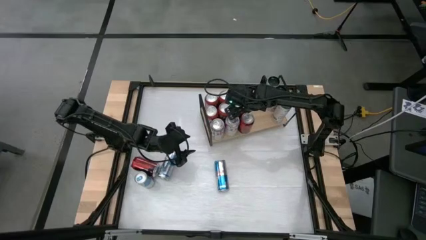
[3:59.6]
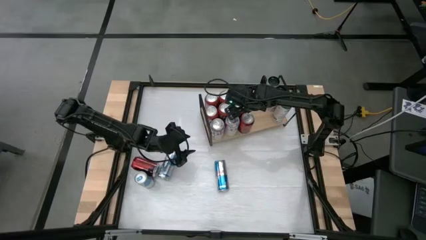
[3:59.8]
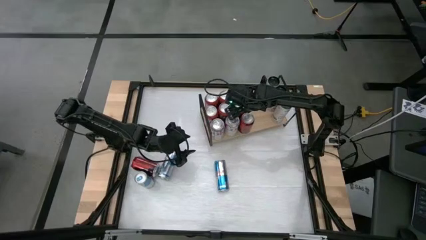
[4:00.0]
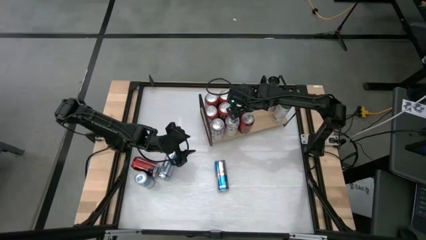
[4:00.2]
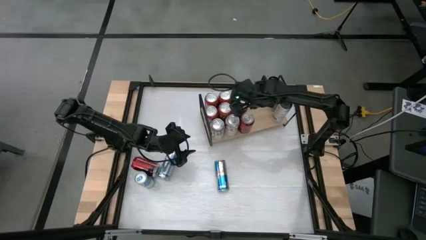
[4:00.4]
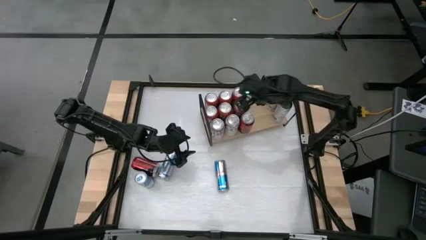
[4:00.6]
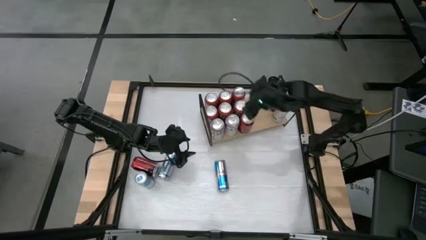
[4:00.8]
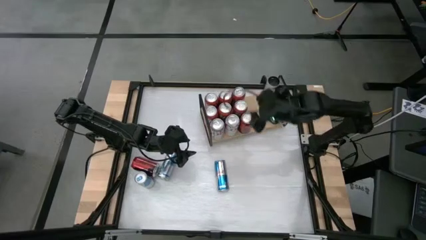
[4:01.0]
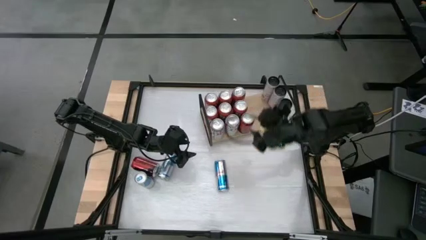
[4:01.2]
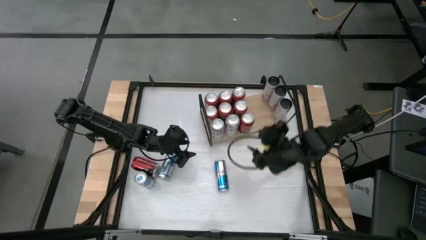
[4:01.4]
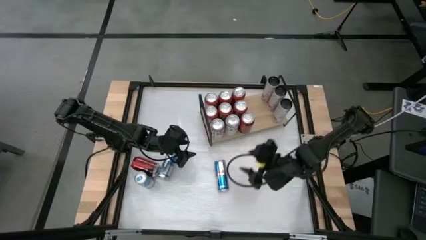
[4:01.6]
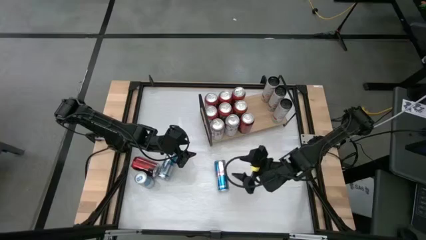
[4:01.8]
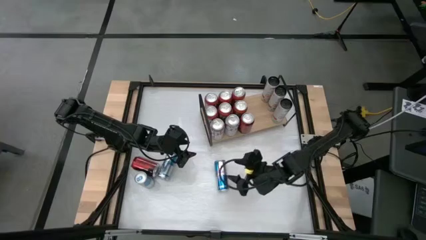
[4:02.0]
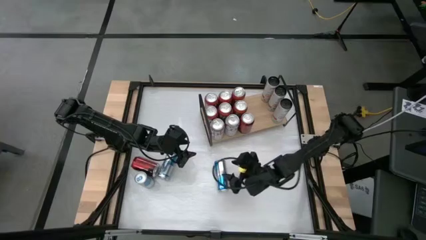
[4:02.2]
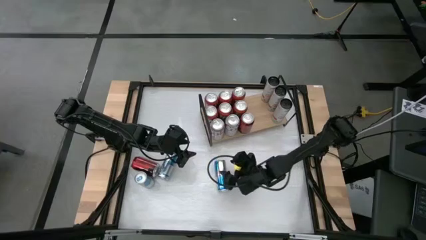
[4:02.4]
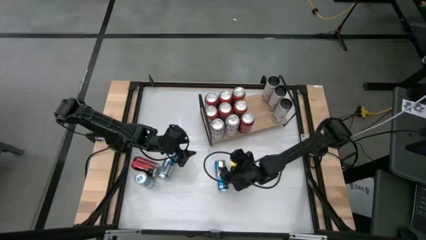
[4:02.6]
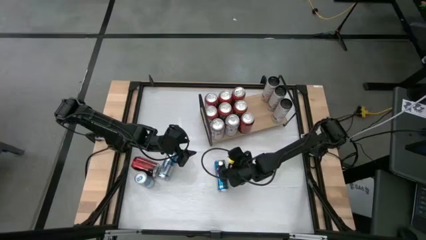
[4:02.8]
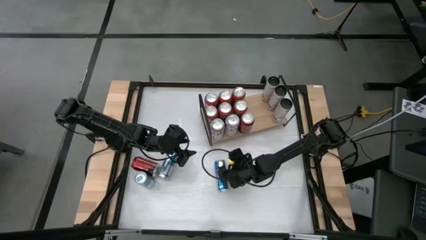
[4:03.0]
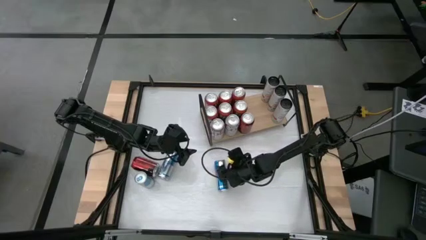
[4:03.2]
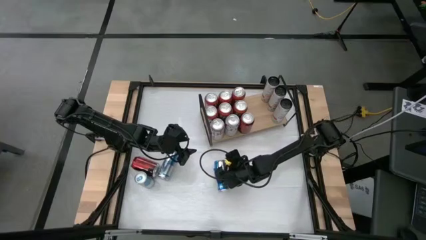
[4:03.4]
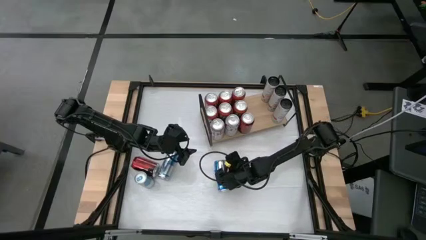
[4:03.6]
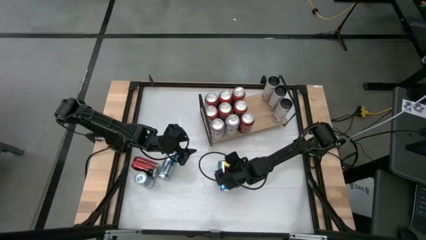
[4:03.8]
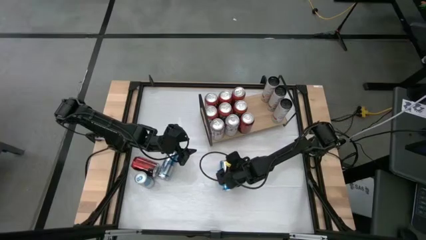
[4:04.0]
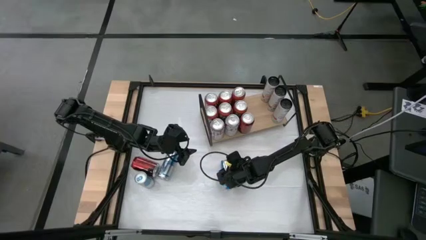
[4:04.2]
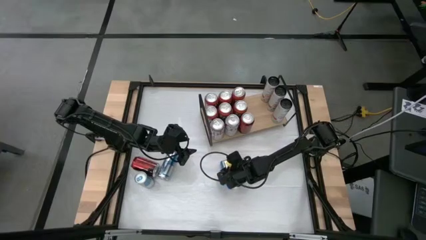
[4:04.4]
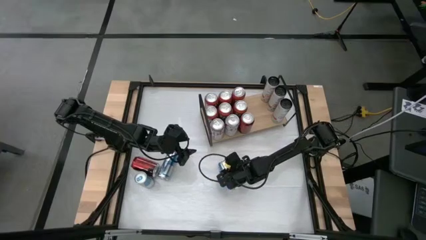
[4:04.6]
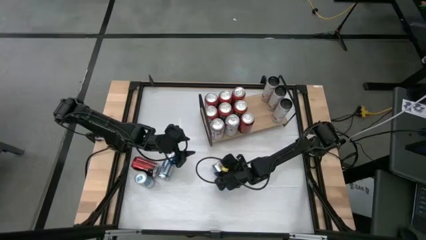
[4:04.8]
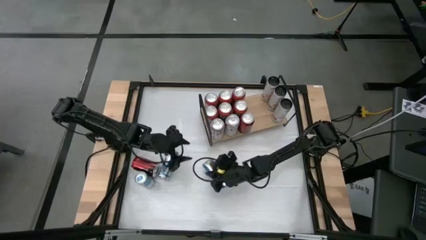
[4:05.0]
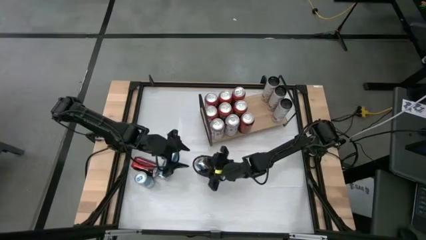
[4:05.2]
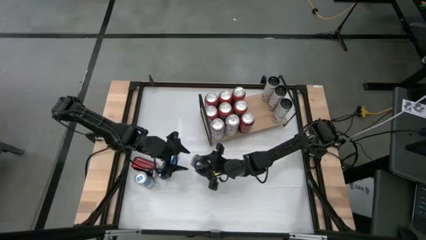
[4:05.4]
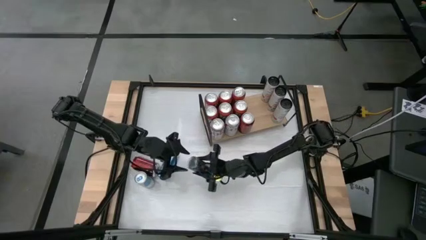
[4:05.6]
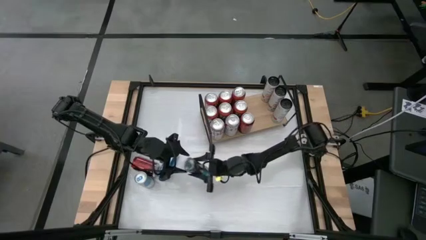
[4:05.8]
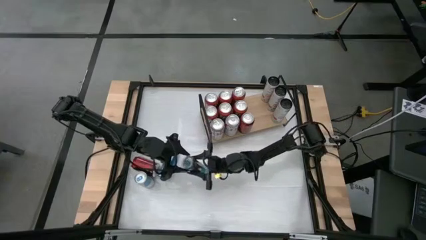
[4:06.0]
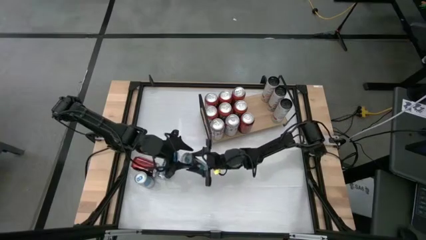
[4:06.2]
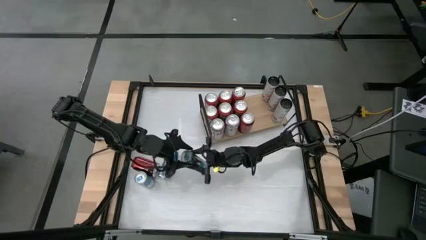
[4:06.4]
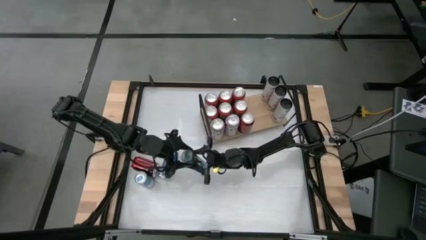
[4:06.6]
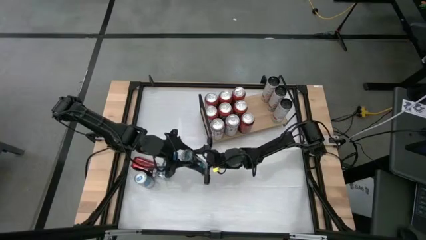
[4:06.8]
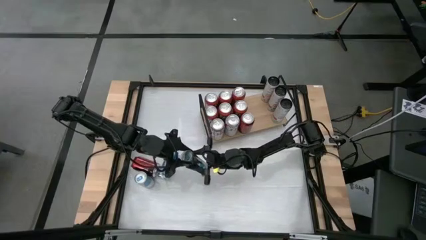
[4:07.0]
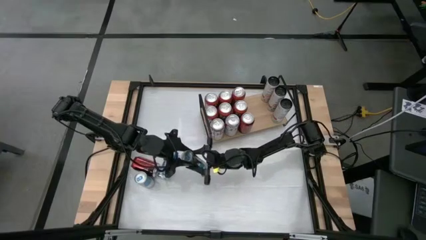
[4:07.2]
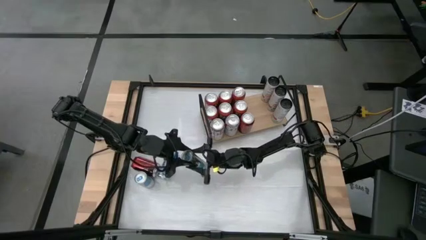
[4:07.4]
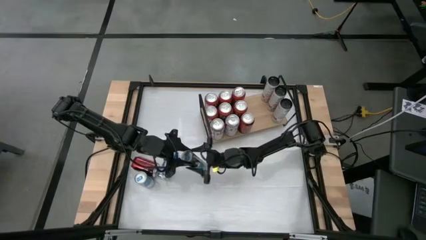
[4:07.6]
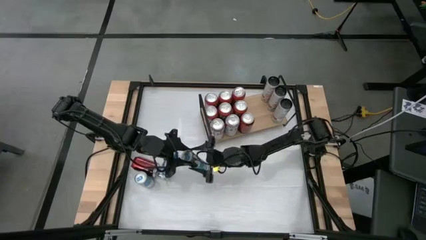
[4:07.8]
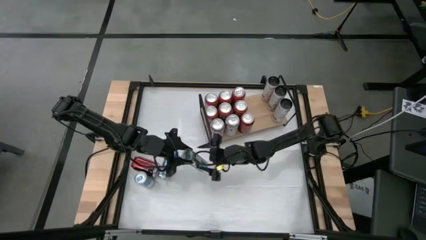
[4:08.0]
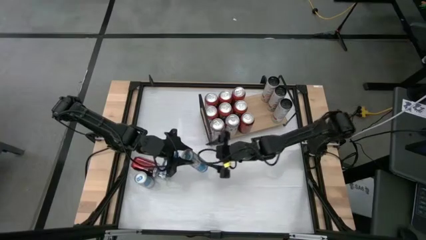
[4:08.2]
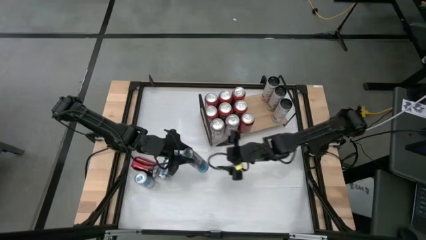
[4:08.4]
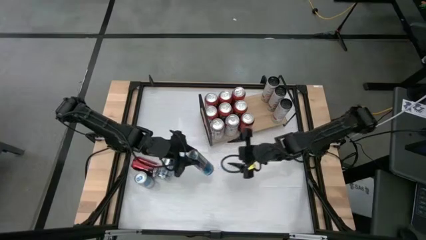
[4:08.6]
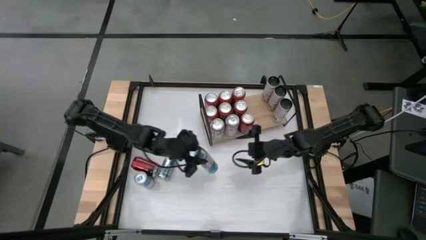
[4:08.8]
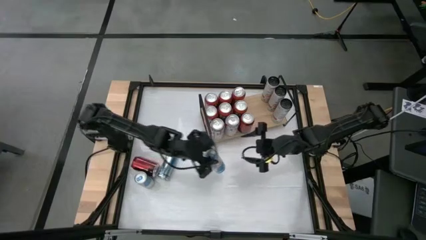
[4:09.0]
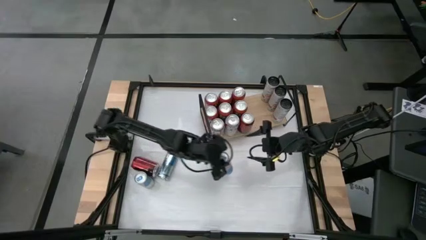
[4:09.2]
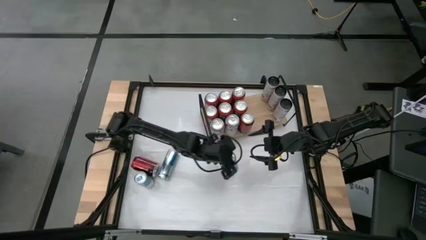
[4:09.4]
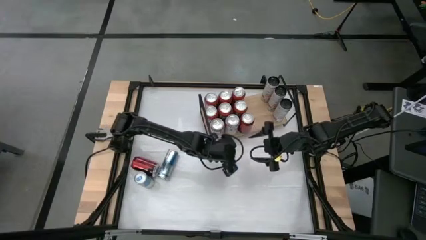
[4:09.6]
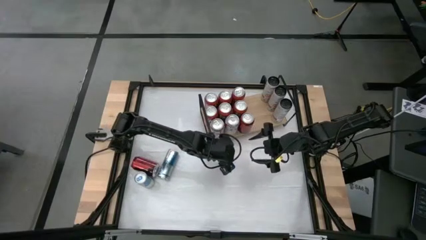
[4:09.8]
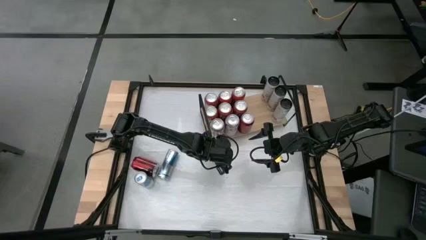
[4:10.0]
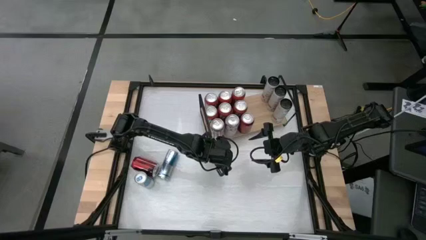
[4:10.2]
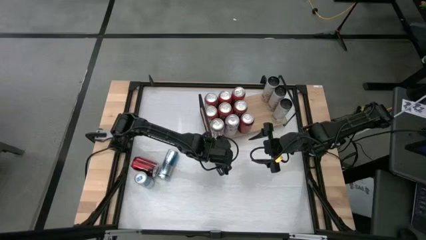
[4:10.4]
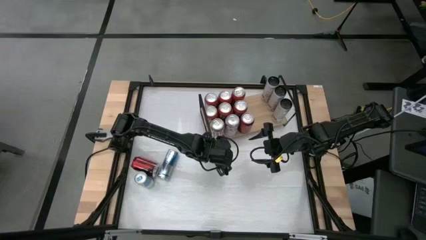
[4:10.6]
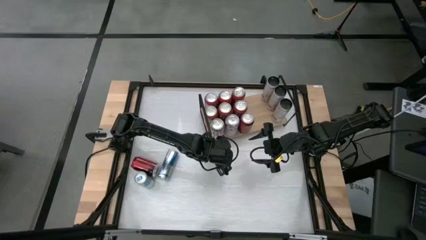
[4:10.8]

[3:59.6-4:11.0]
Task: Place canned beverage on shelf
Put the right blue soda can on the shelf

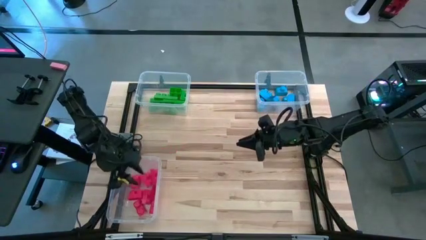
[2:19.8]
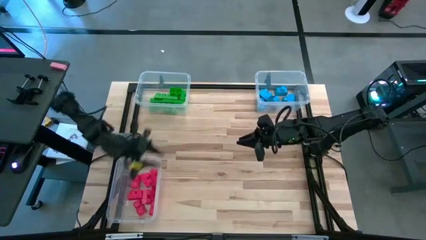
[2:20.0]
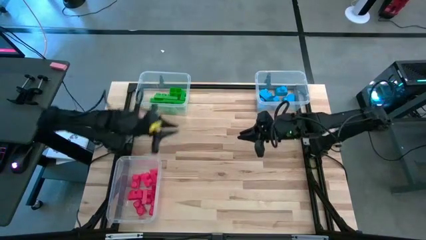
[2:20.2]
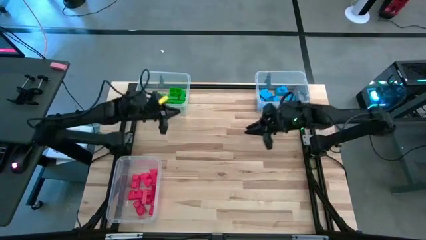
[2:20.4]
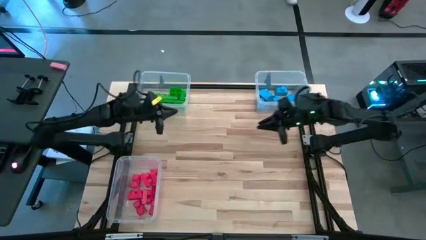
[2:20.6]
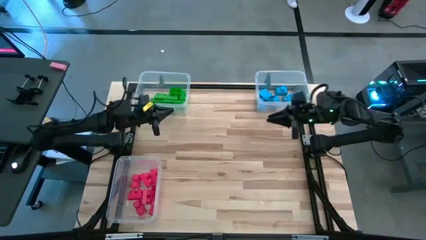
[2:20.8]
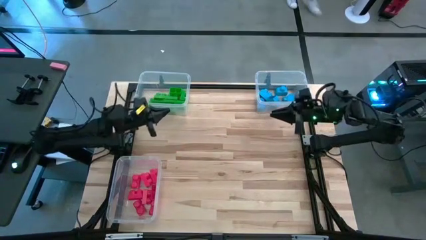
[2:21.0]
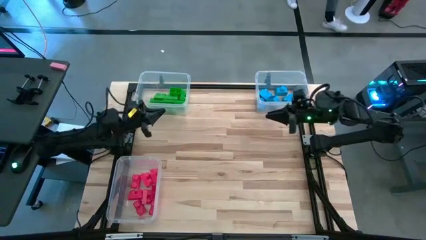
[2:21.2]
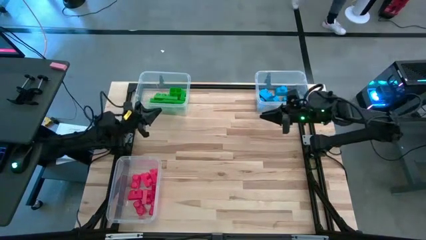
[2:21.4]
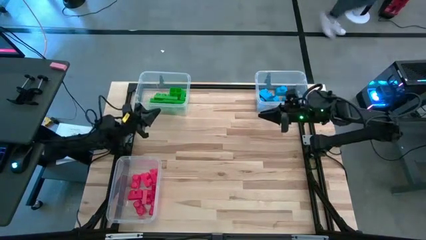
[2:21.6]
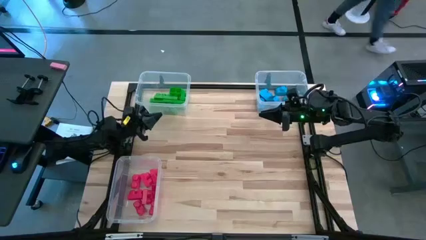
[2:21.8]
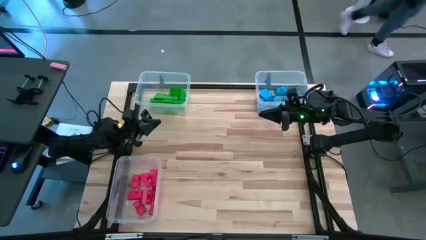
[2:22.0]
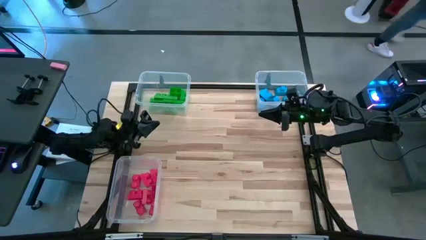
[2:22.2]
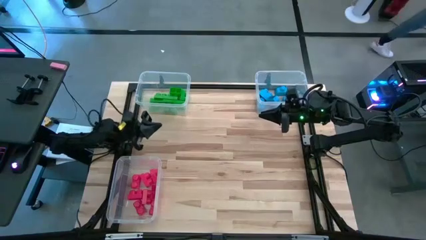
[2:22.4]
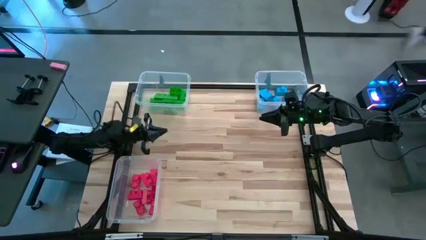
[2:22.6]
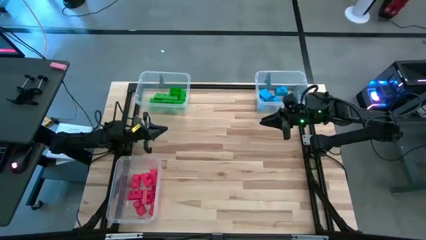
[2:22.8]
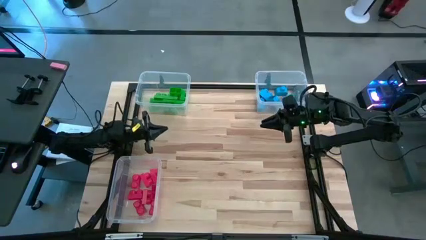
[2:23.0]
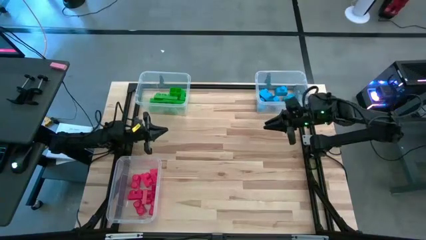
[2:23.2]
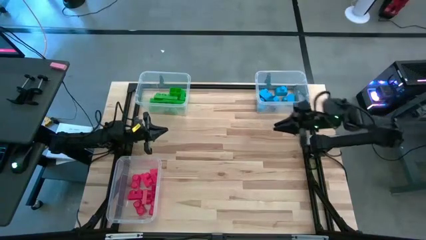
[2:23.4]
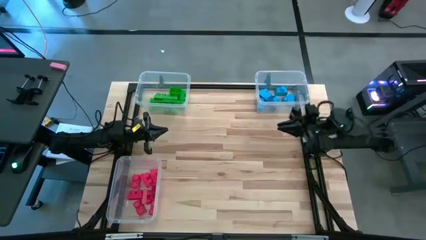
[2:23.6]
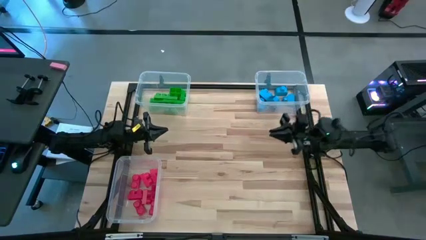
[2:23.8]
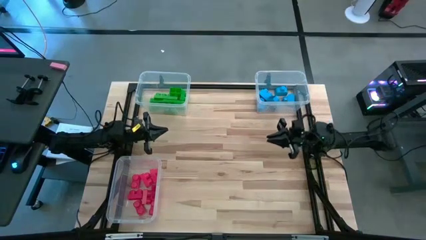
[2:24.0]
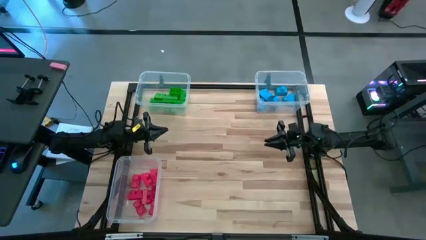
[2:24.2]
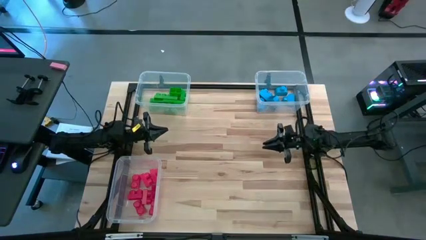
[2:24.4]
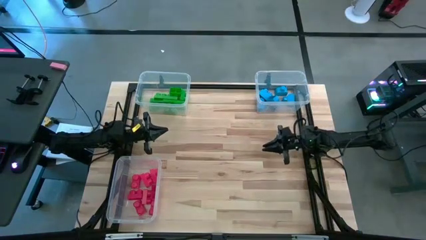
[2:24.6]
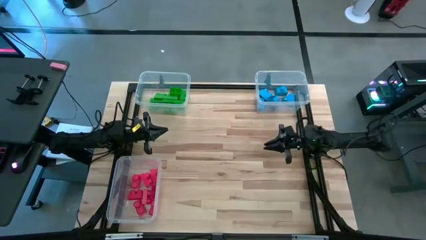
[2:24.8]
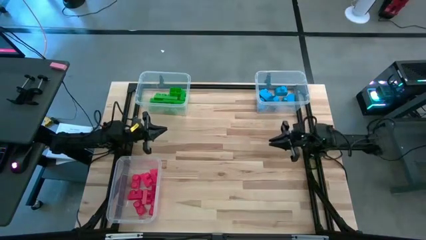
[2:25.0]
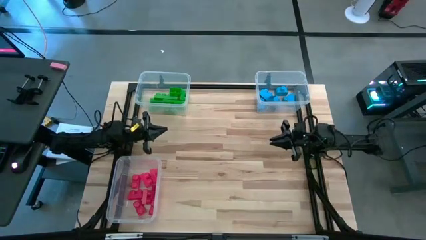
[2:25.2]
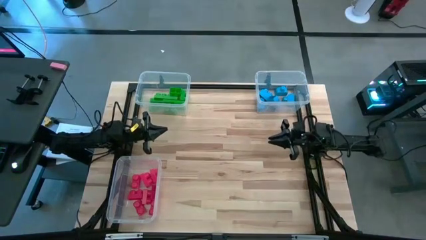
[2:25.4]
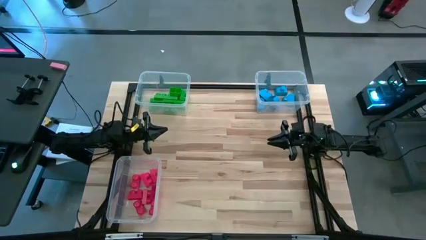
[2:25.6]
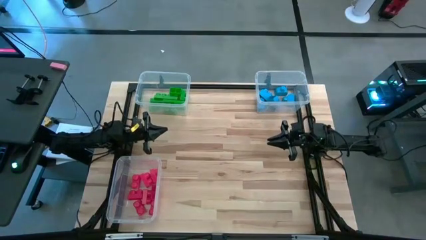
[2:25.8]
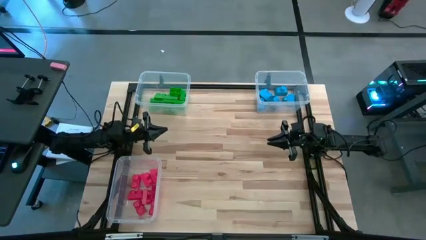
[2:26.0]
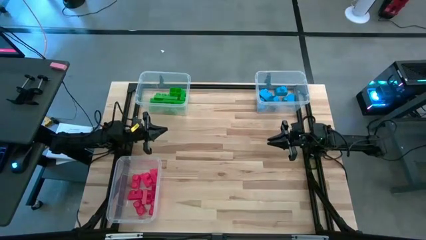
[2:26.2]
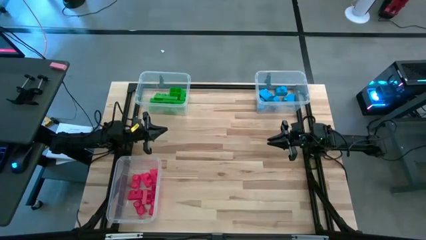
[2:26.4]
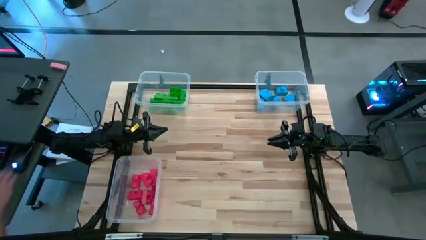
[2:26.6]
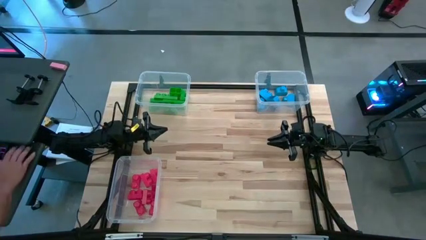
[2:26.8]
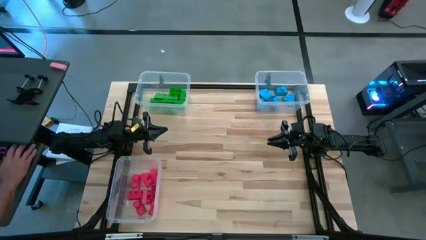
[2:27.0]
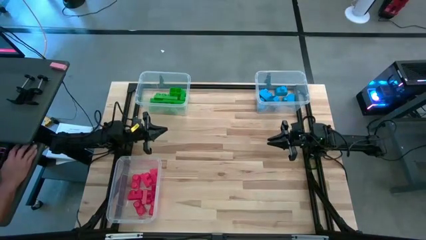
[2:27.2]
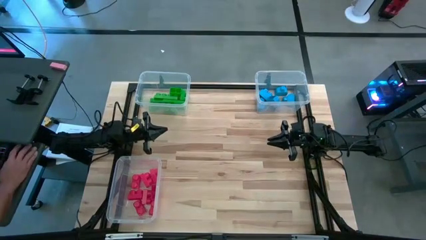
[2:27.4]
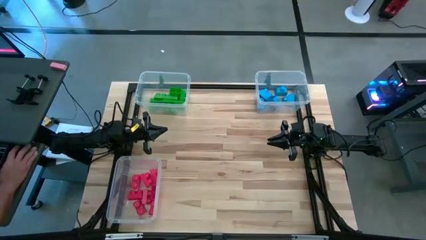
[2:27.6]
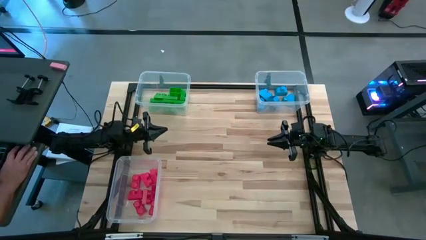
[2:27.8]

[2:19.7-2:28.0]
Task: Sort blocks
Return to Home Position
